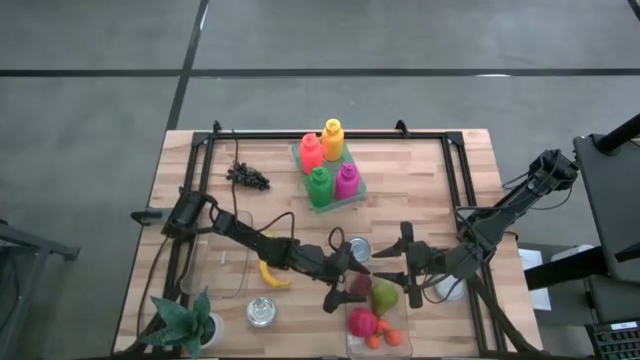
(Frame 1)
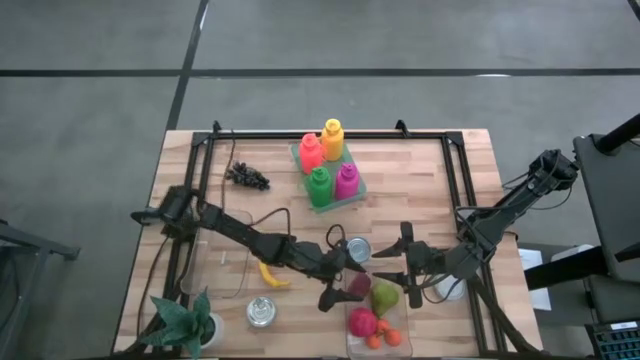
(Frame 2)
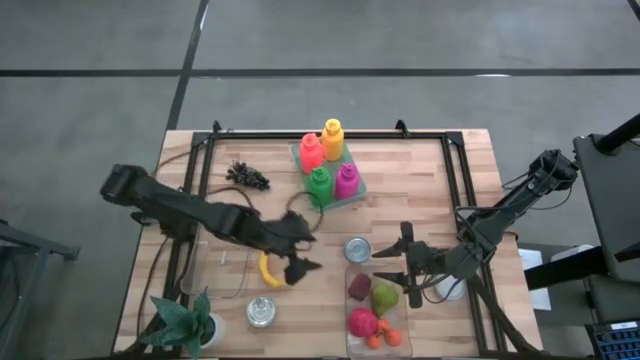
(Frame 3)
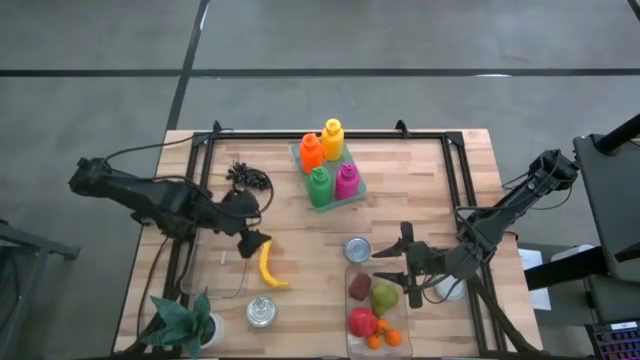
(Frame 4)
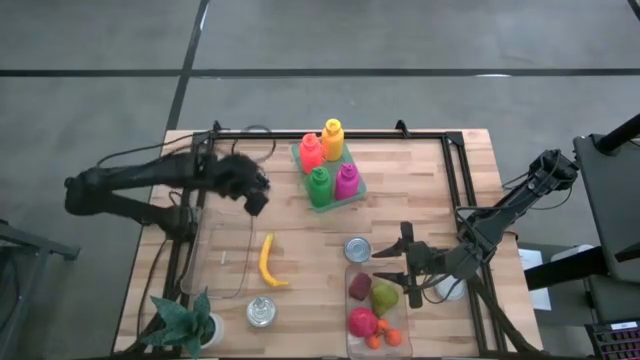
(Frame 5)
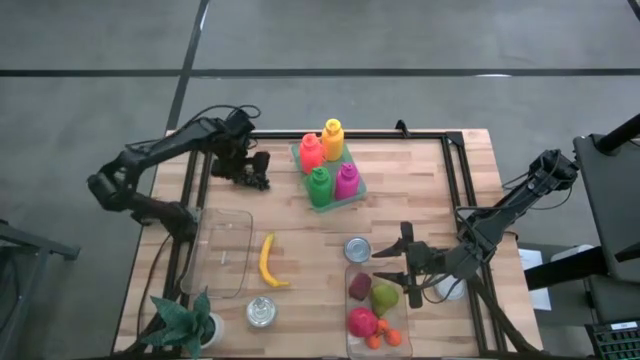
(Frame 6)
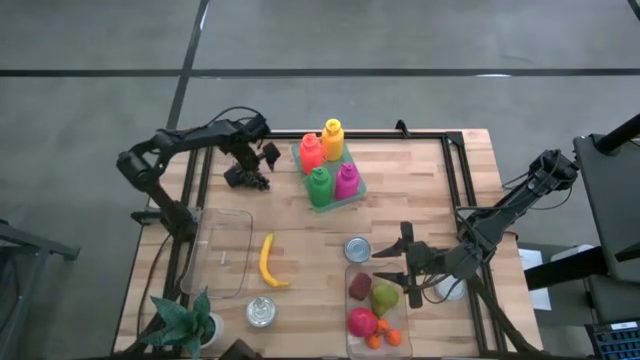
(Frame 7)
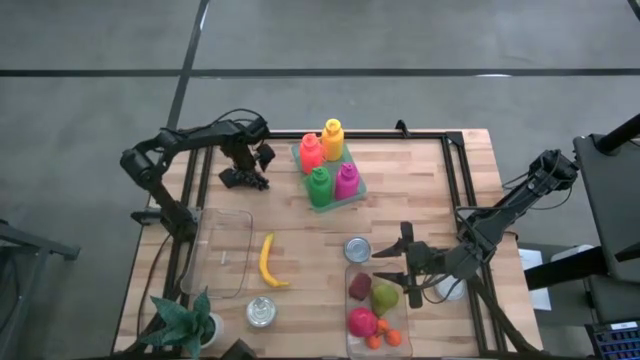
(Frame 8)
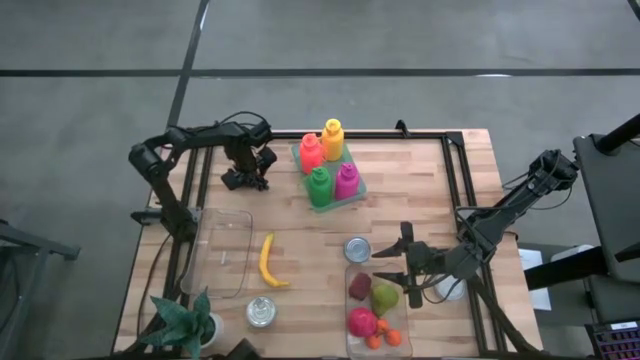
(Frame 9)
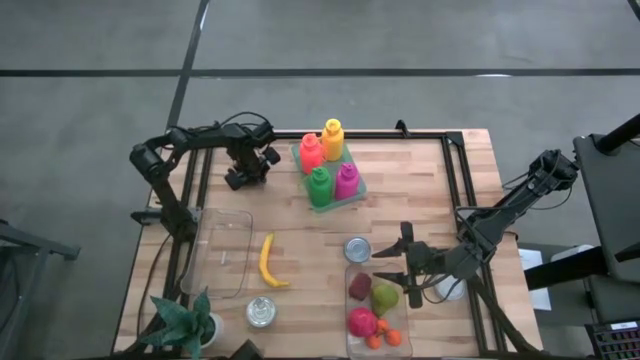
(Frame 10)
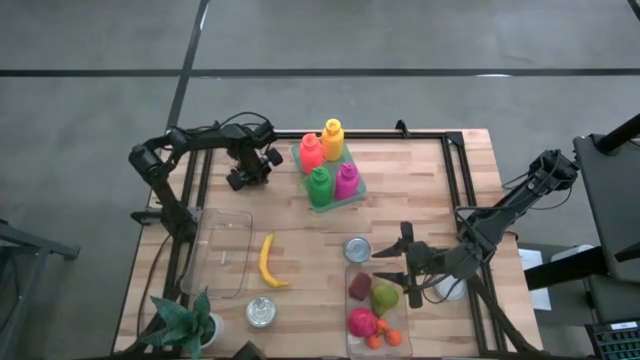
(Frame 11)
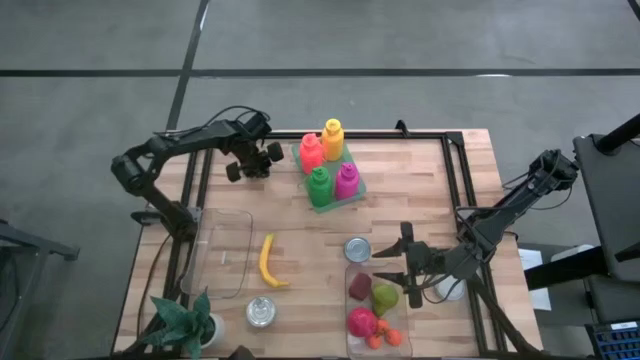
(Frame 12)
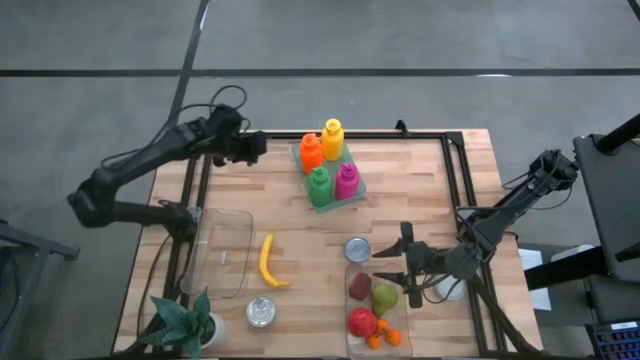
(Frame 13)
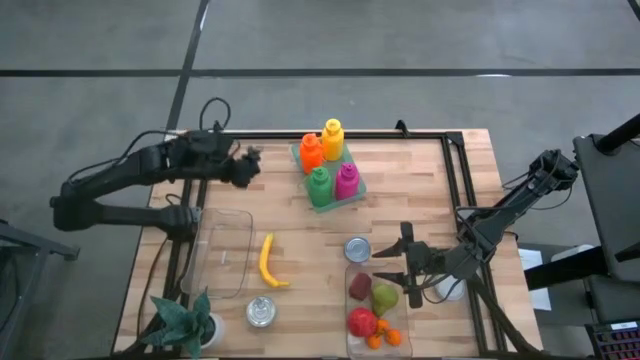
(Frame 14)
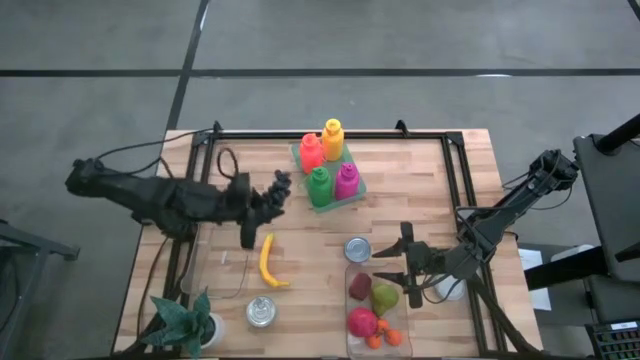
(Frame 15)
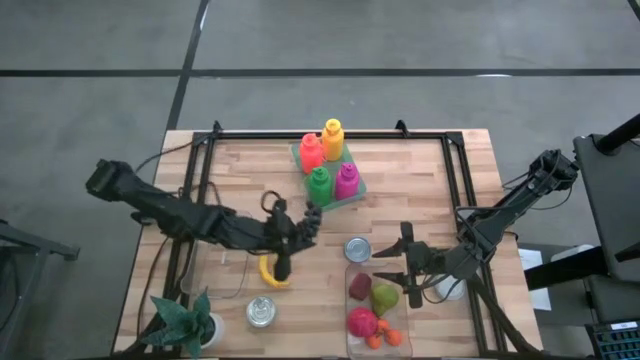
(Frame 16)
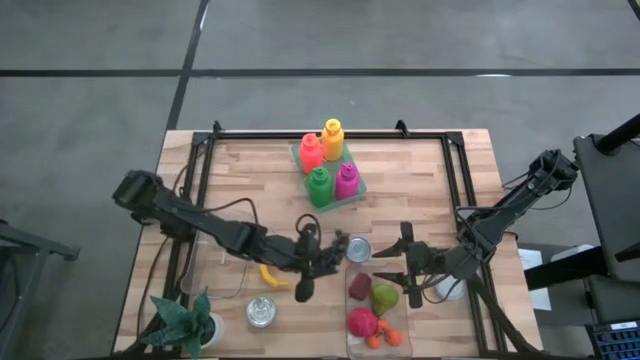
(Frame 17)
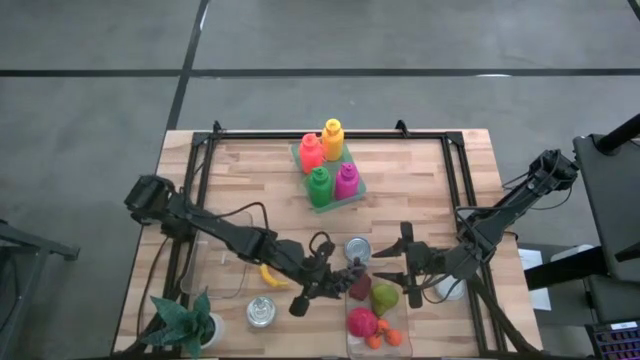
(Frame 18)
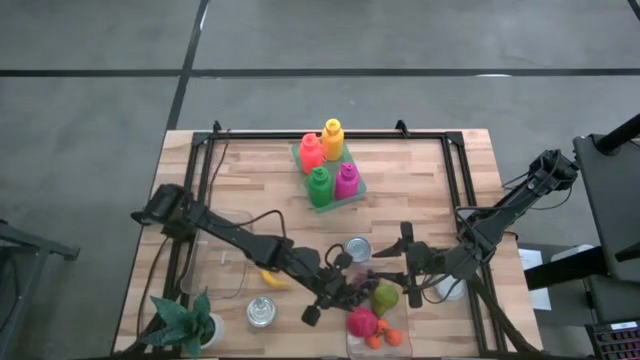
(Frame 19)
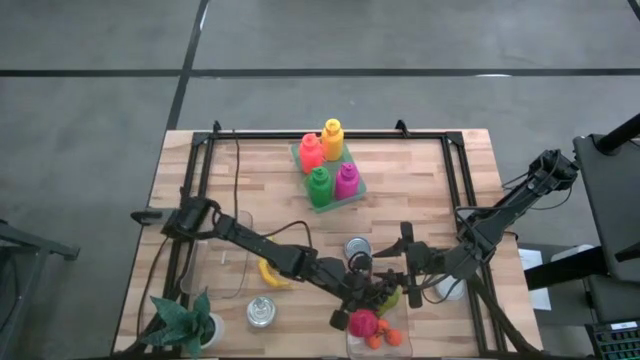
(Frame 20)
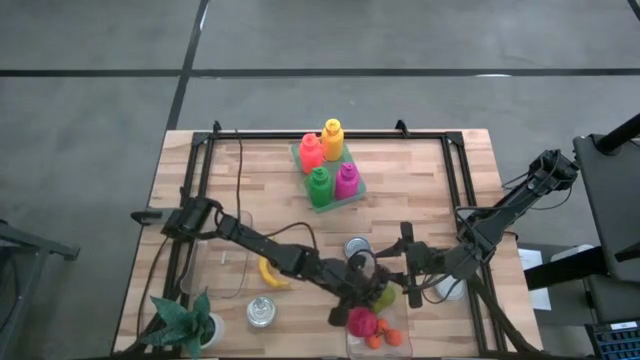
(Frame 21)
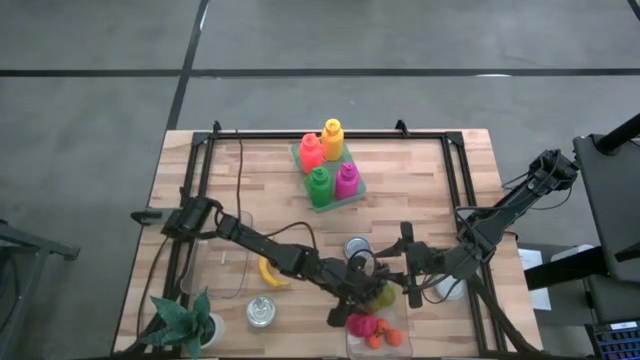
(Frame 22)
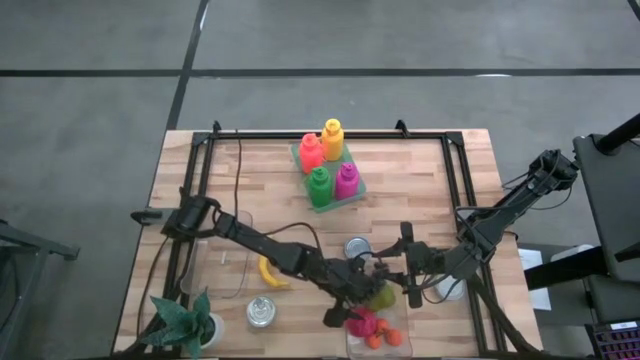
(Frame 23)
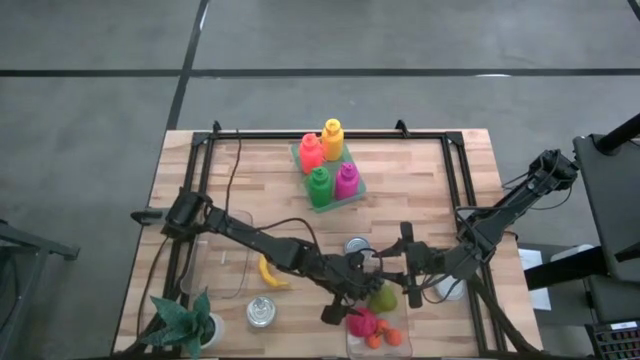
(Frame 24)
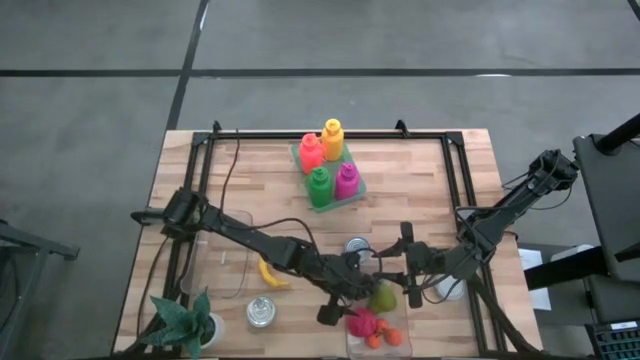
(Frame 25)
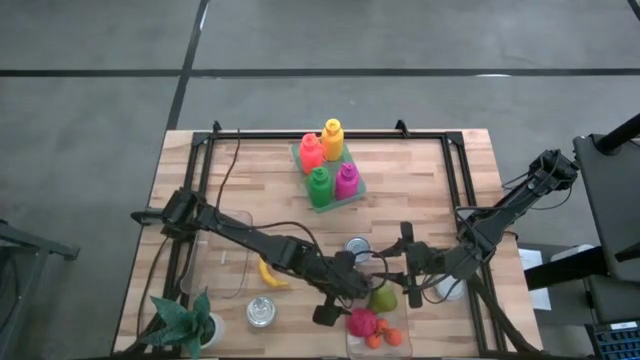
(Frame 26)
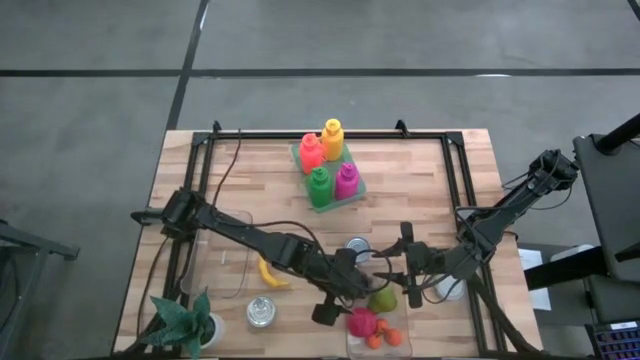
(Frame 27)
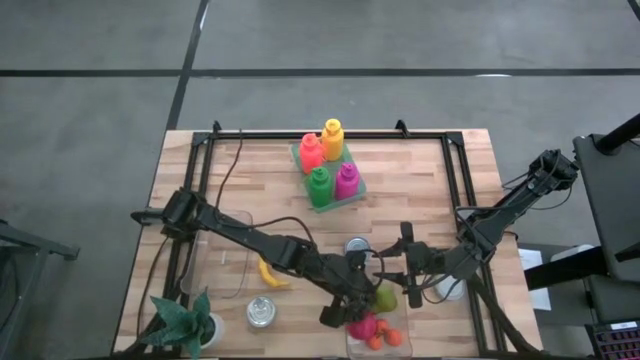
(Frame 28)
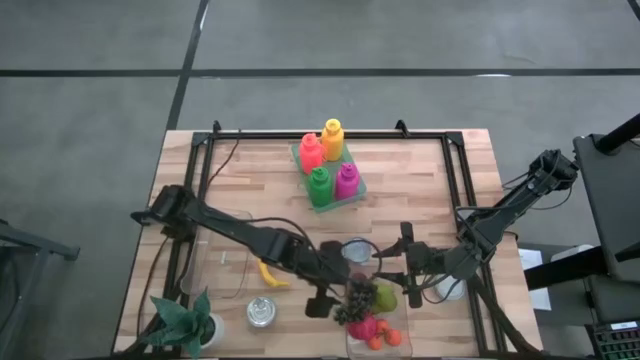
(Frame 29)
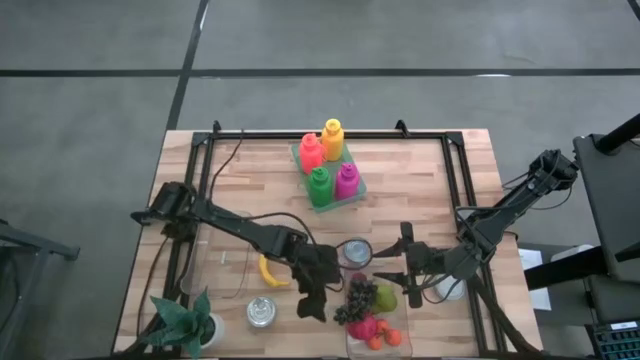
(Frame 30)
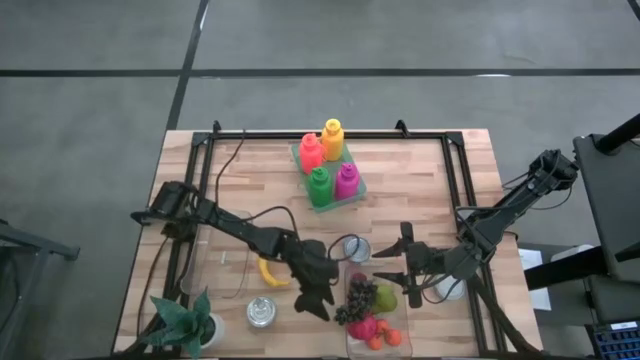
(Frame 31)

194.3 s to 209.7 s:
Task: Pick & Place Food Item
Put the black grapes into the bottom transparent bin

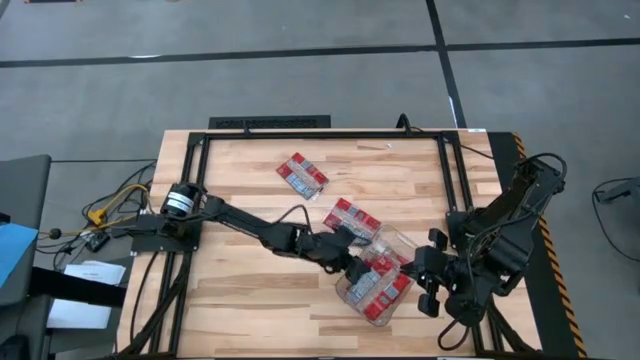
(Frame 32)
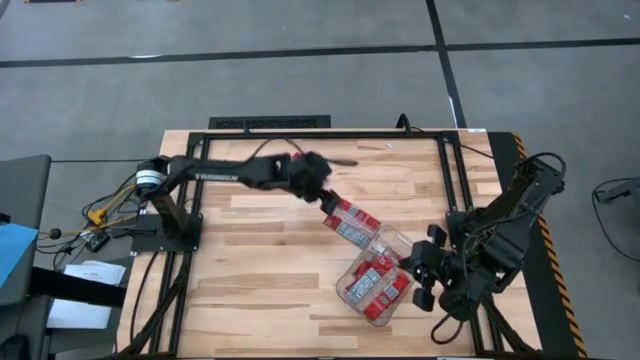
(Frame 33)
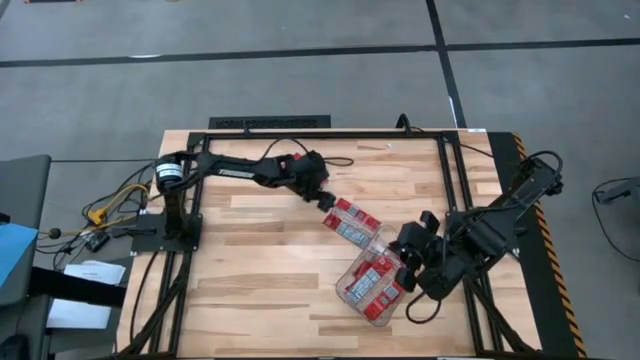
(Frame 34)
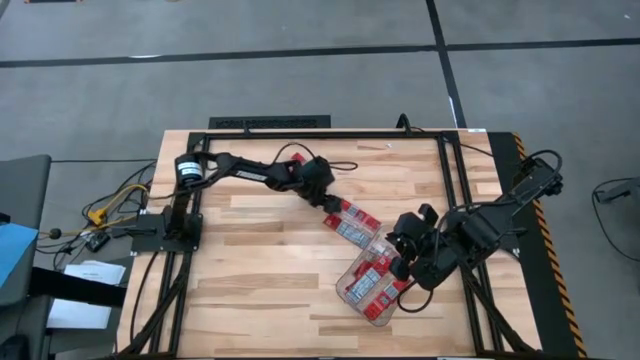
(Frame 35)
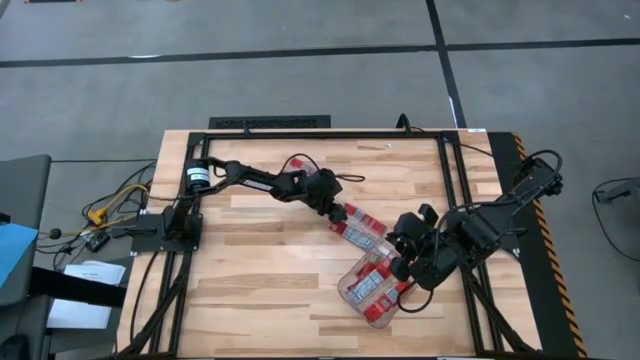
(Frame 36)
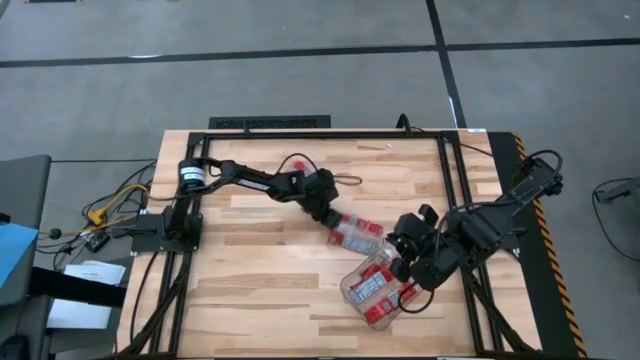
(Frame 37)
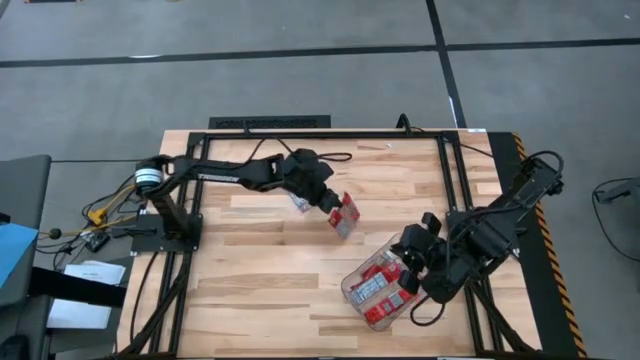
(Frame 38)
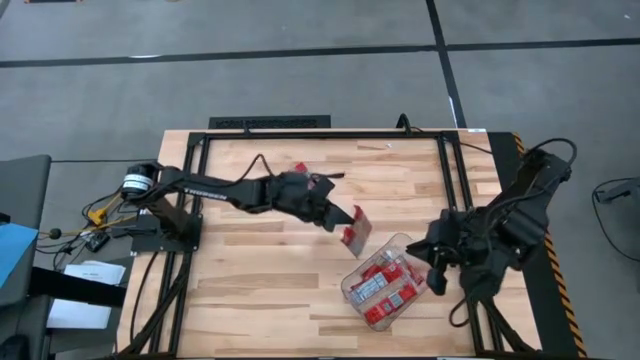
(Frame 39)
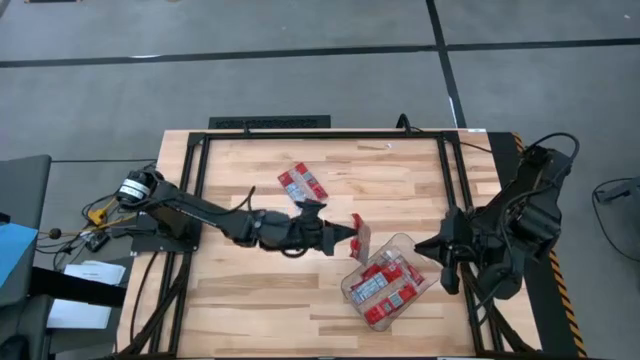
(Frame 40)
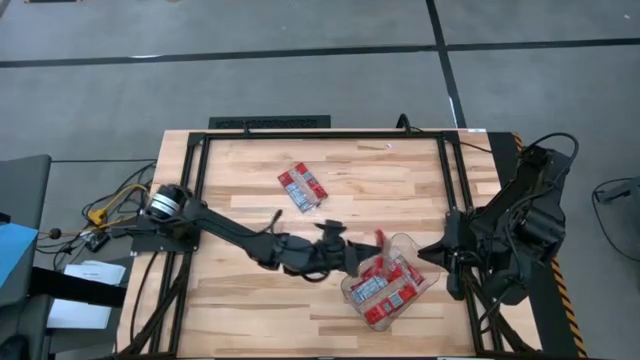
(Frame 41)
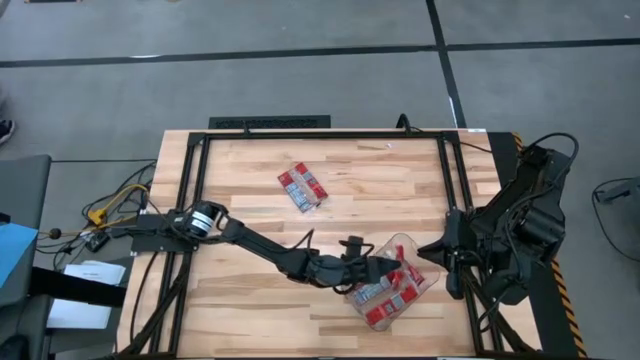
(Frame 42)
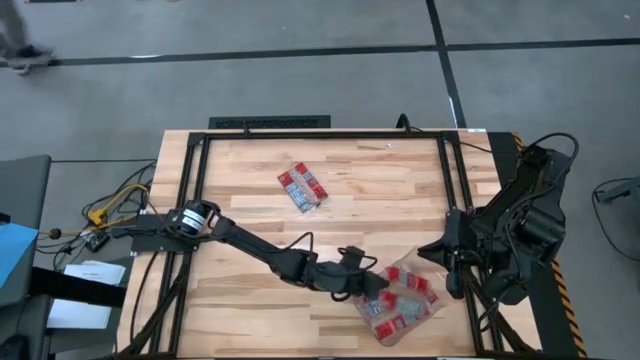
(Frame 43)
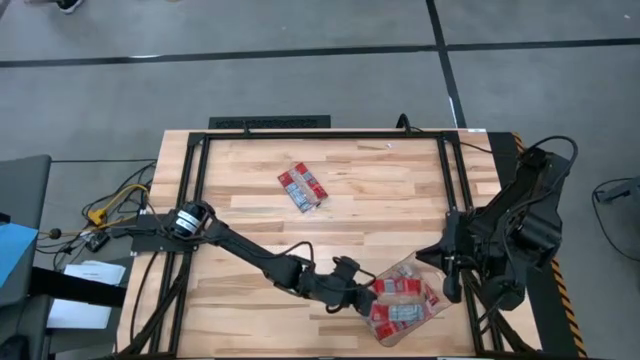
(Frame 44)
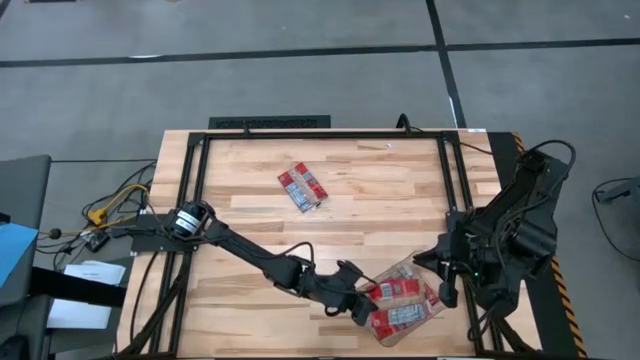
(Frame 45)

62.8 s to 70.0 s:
Task: Sort popcorn bags into baskets
Put the red popcorn bag into the transparent bin
